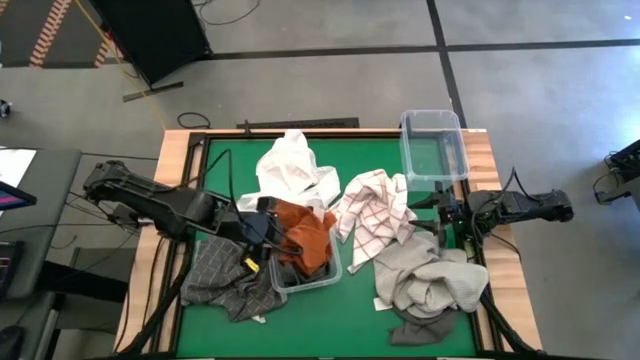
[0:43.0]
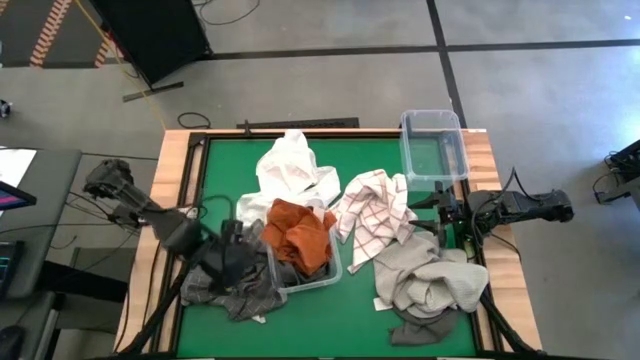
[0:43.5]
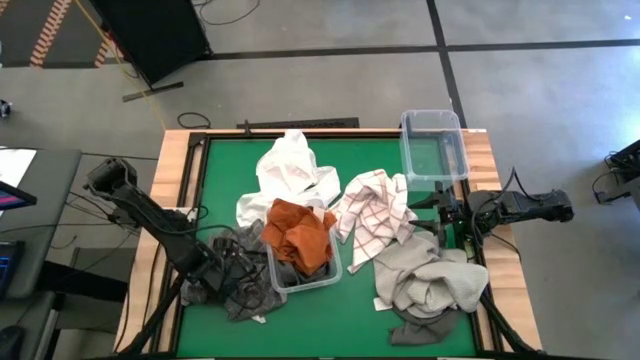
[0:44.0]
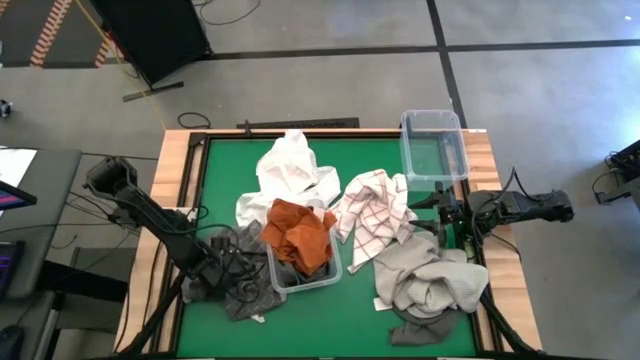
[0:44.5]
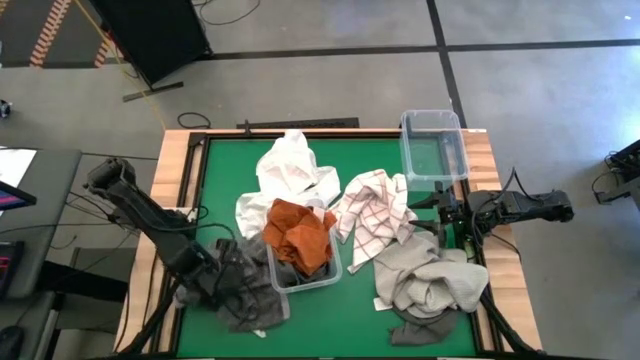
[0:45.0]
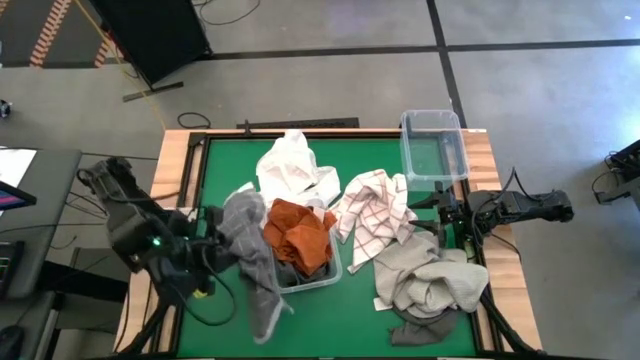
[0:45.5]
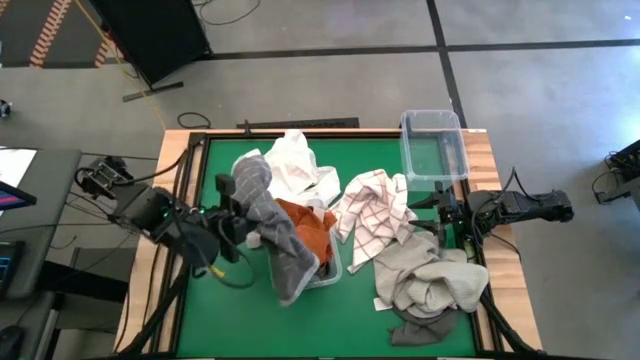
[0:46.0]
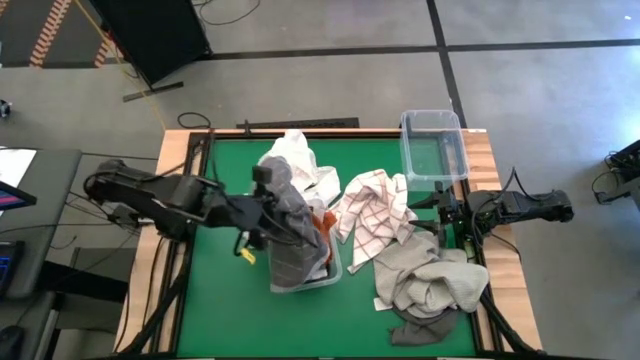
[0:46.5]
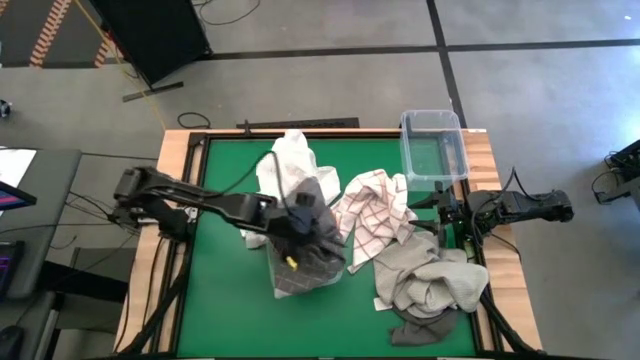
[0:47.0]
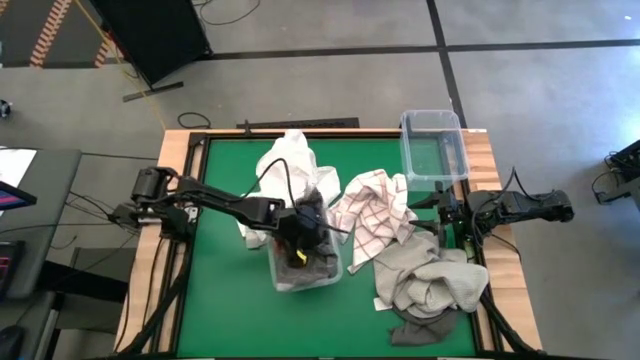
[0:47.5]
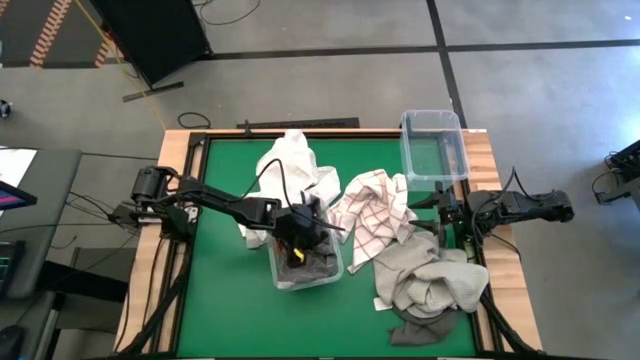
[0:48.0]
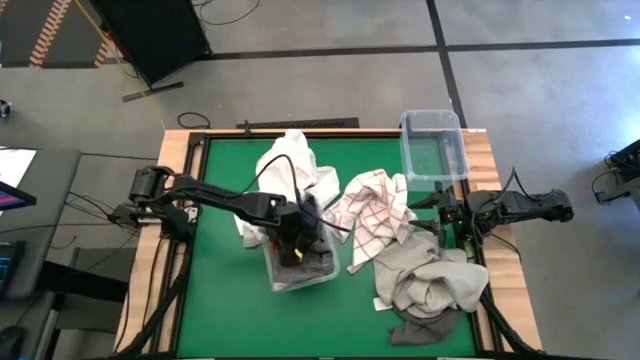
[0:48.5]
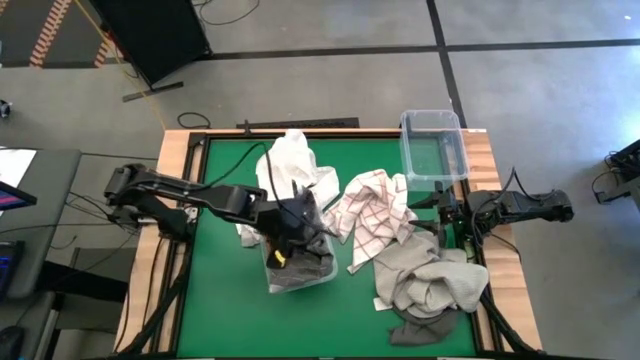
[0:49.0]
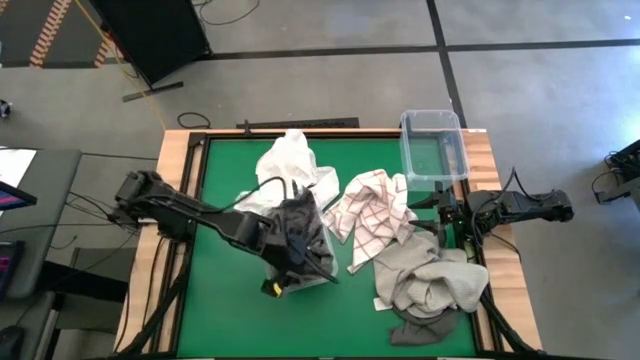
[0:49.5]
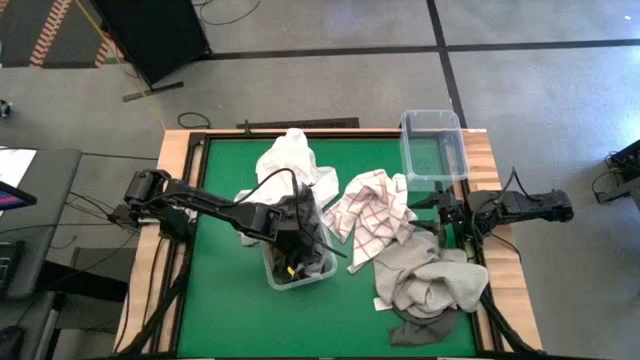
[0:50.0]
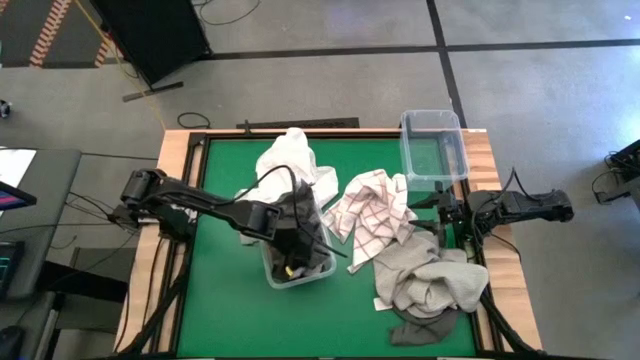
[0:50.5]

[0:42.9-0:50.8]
Task: Sort towels by color in basket
Put the black stripe towel into the bottom transparent bin

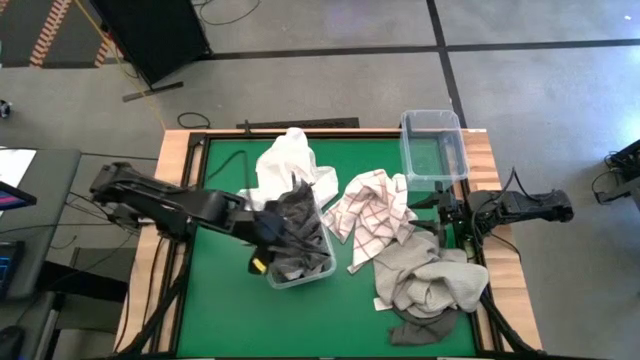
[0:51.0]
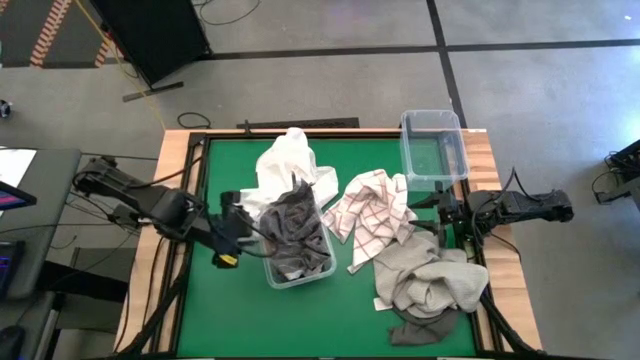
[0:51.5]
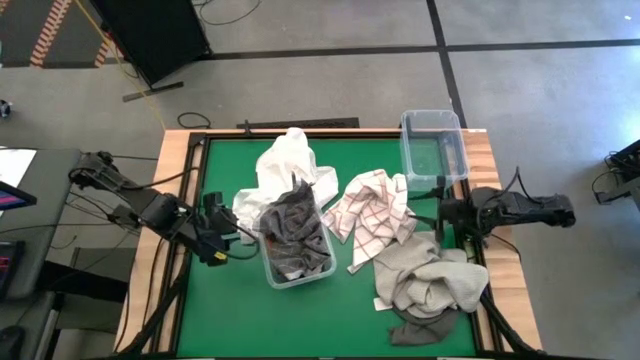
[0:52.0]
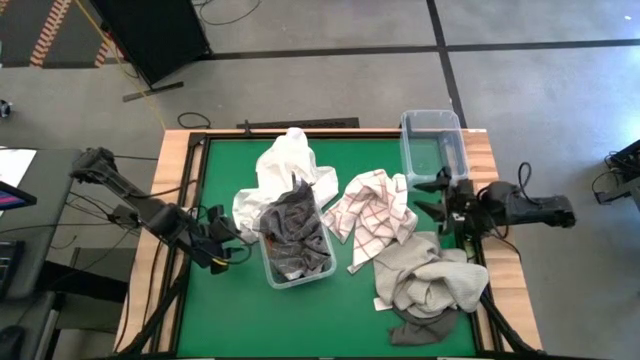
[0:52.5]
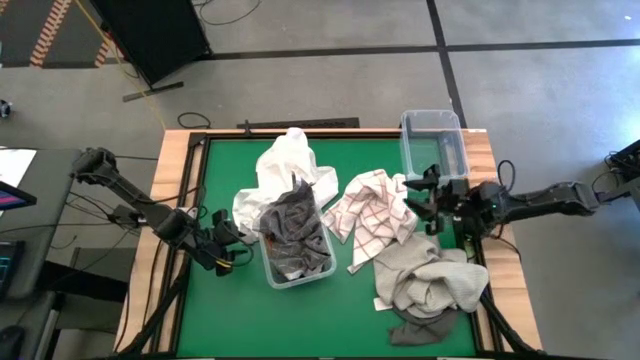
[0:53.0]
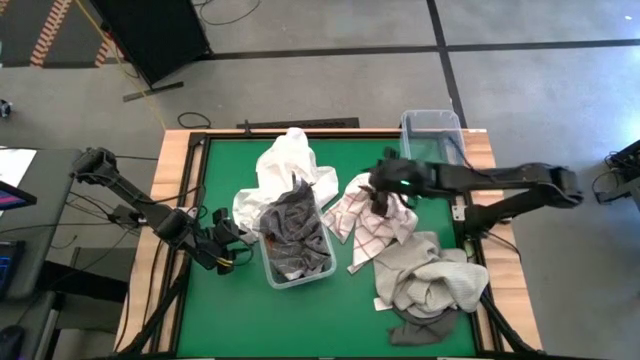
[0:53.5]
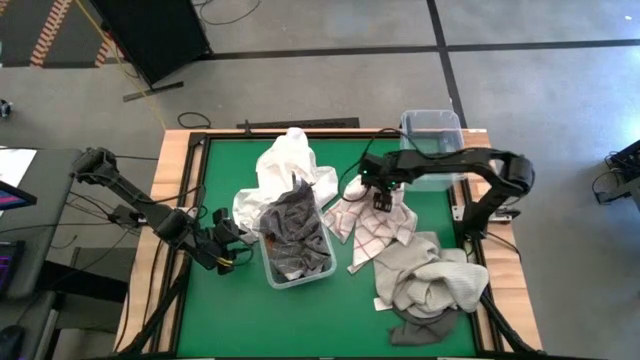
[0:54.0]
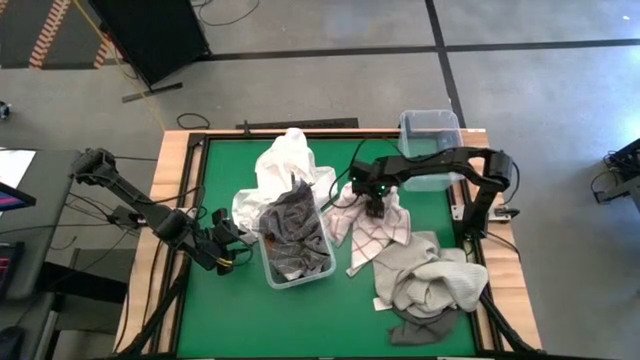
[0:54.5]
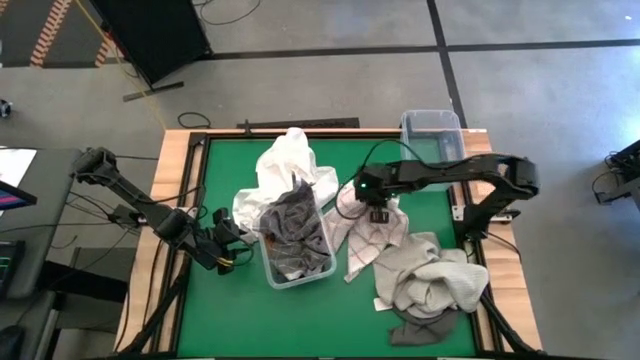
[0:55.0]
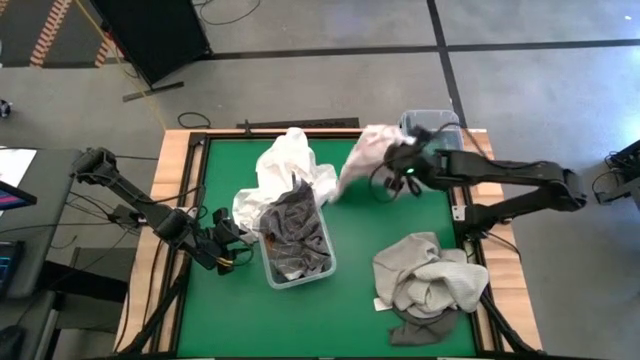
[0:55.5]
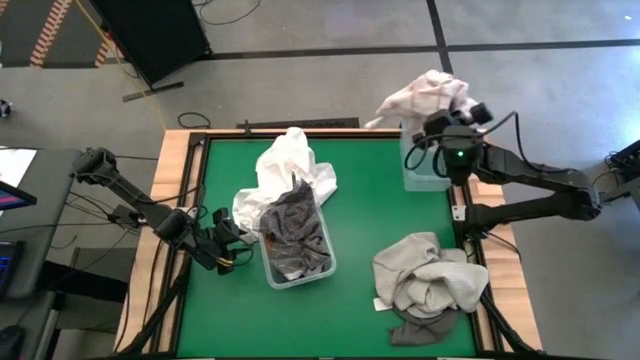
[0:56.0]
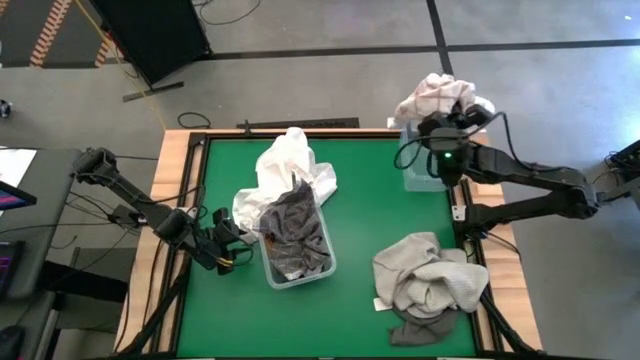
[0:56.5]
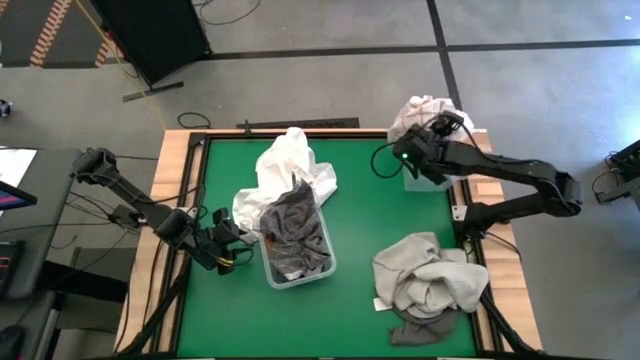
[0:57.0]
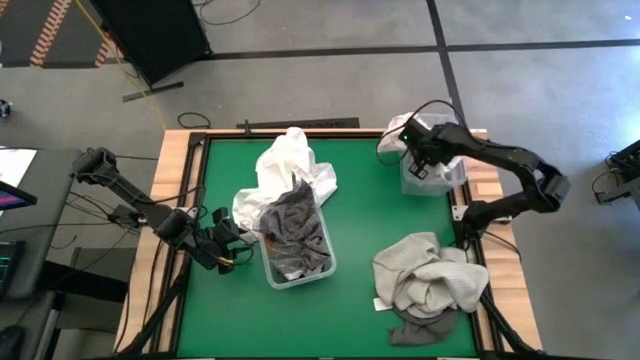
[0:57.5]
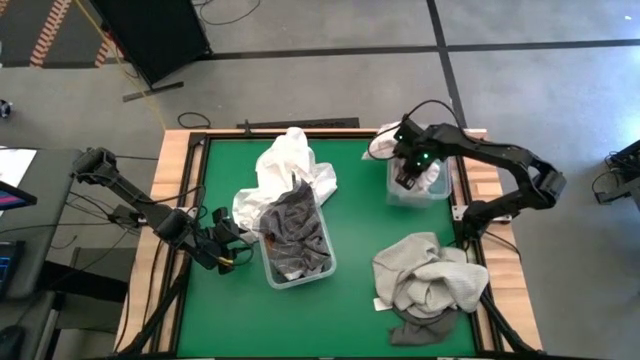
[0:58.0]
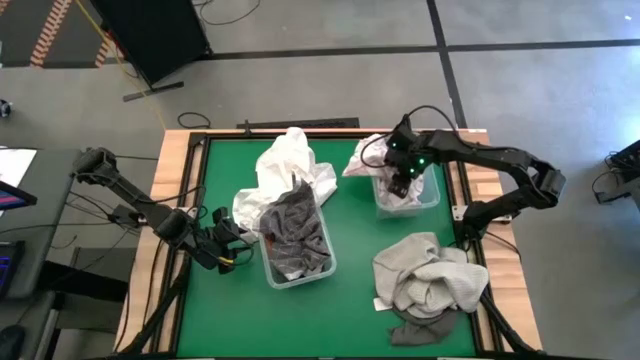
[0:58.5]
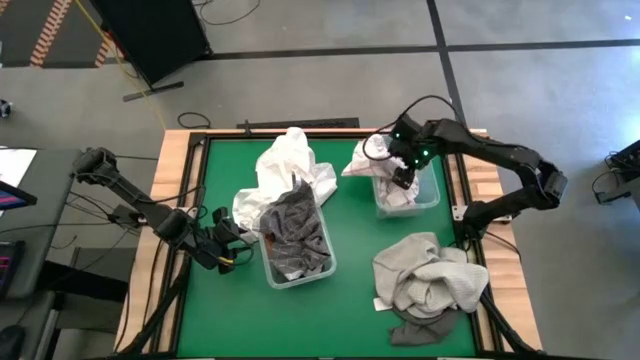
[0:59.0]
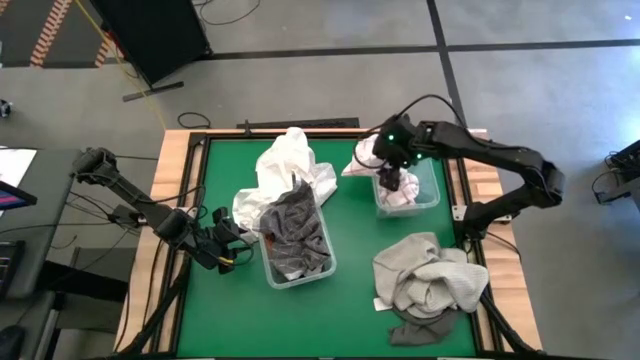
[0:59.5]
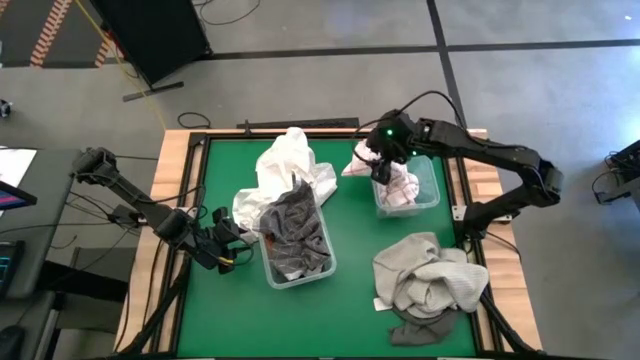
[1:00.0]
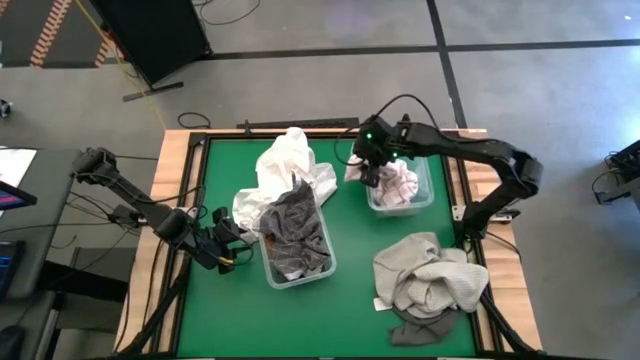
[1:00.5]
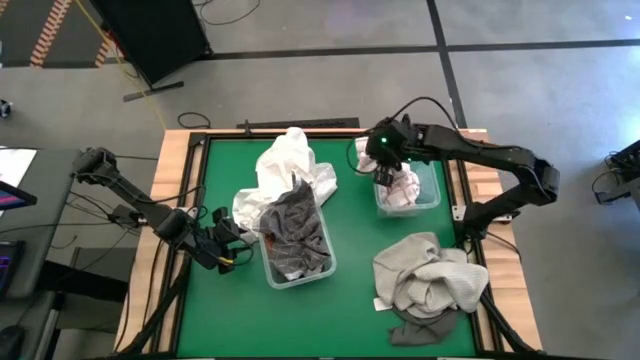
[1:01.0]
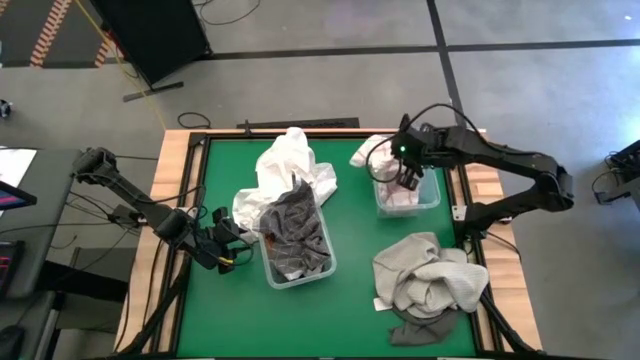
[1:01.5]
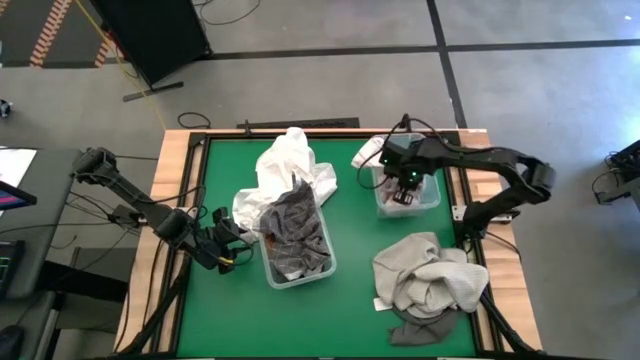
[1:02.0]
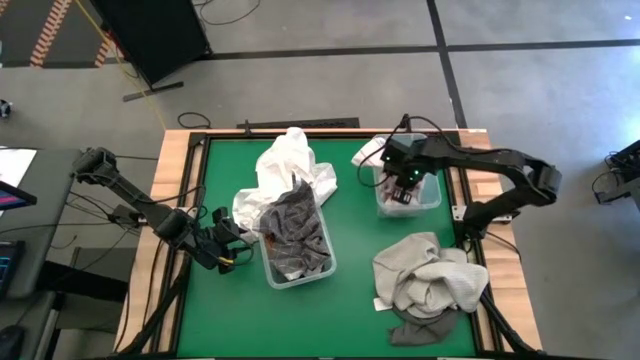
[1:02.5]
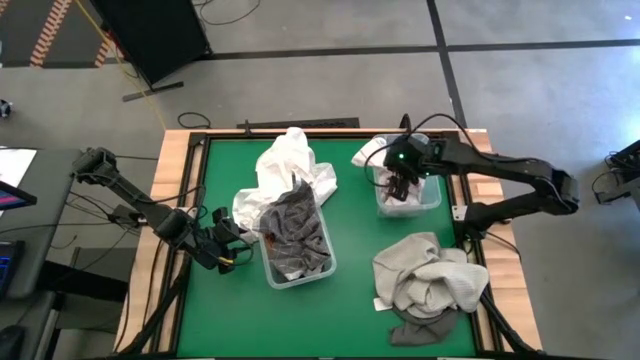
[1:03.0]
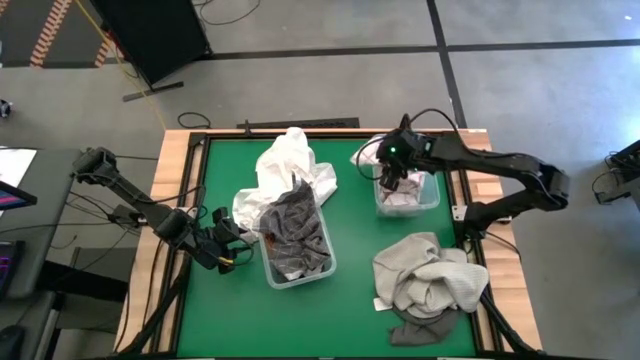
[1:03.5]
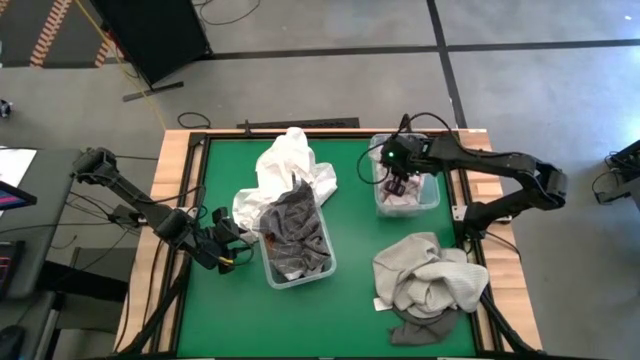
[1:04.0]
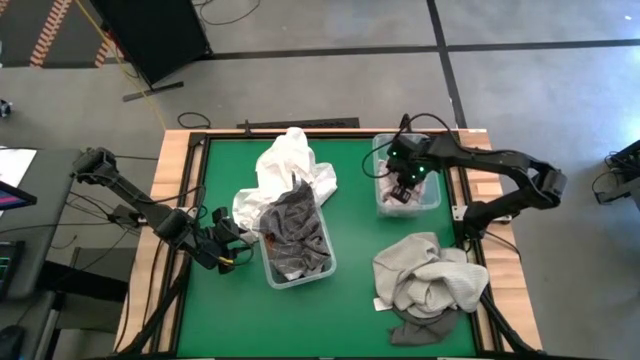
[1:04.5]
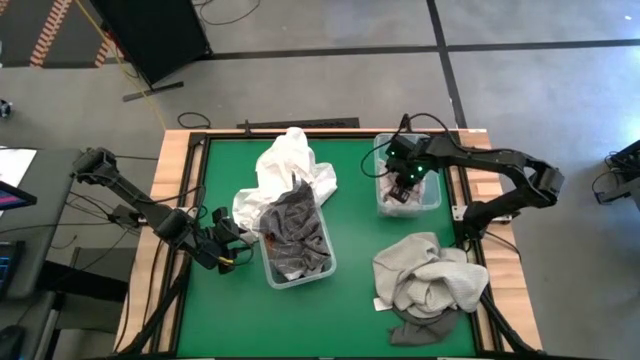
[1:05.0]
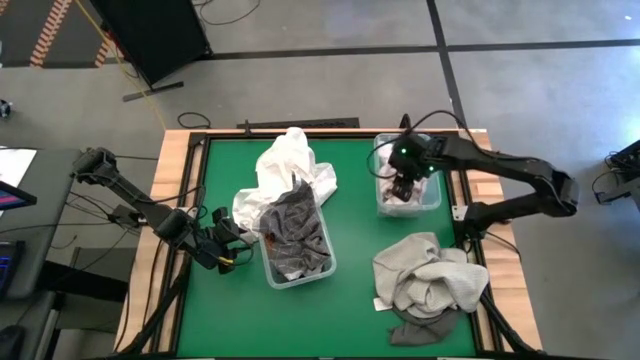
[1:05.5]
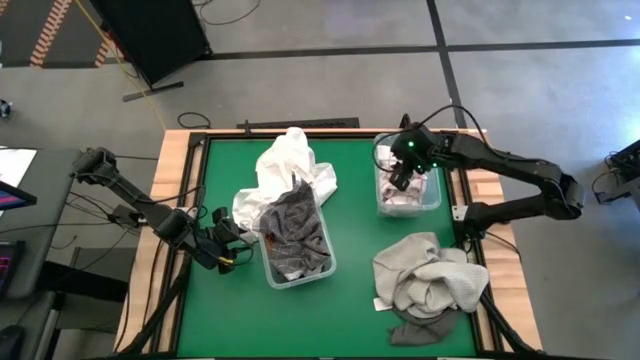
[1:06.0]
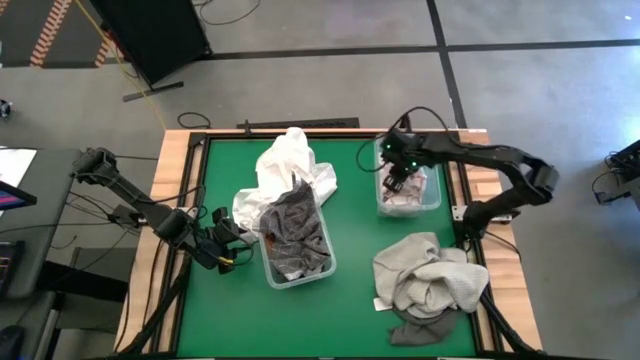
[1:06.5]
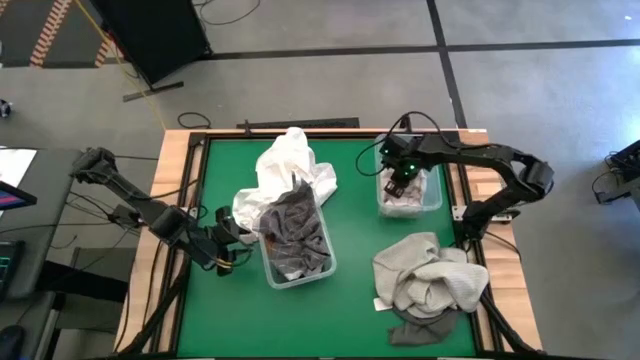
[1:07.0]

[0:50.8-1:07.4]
Put the white stripe towel into the top transparent bin
